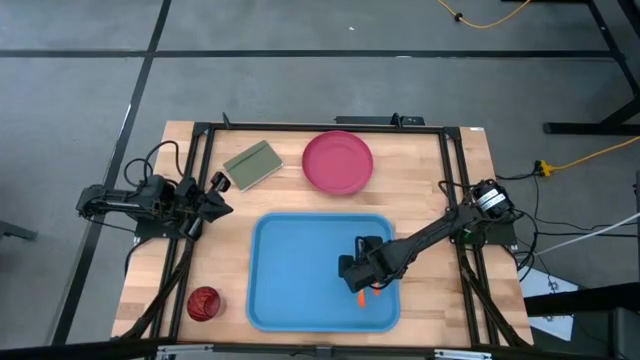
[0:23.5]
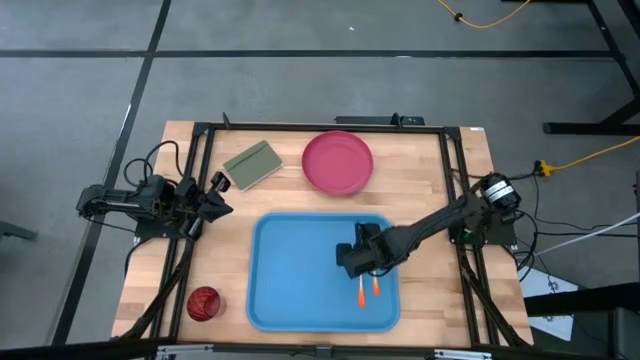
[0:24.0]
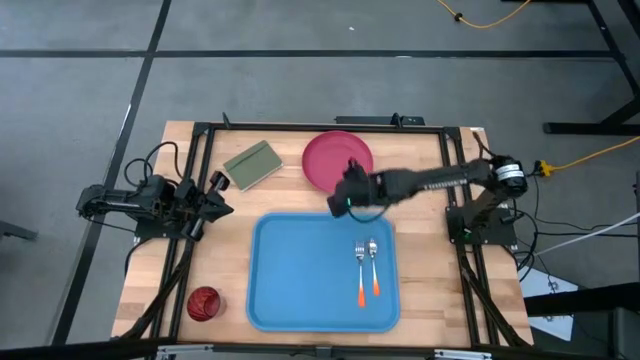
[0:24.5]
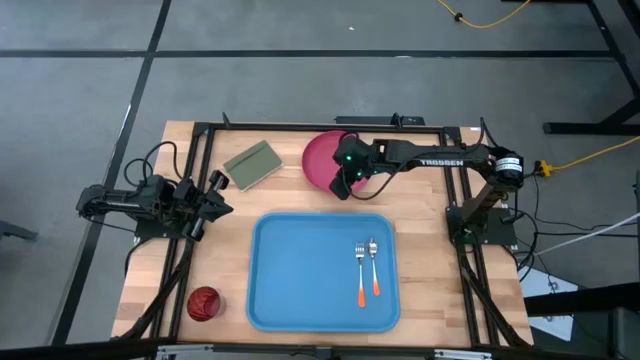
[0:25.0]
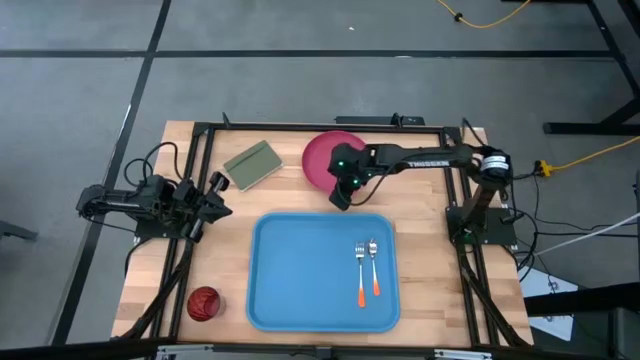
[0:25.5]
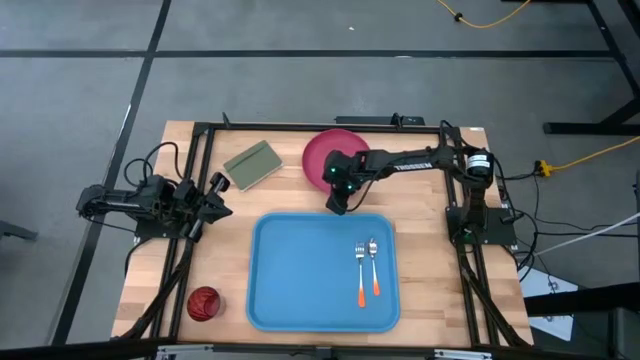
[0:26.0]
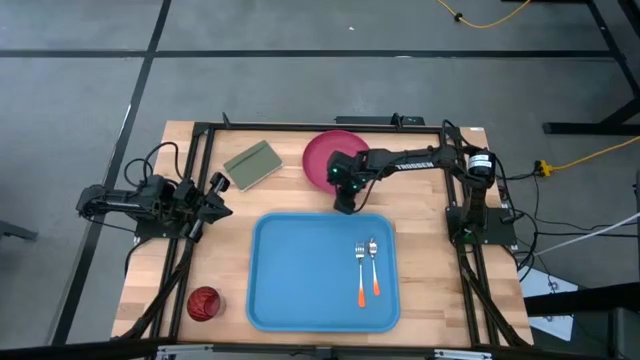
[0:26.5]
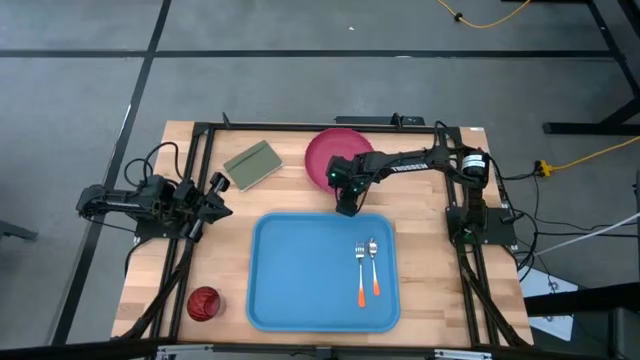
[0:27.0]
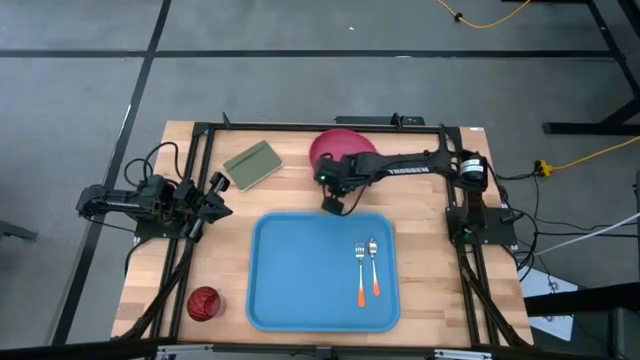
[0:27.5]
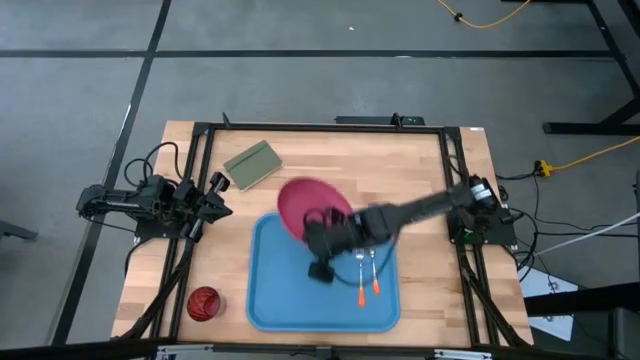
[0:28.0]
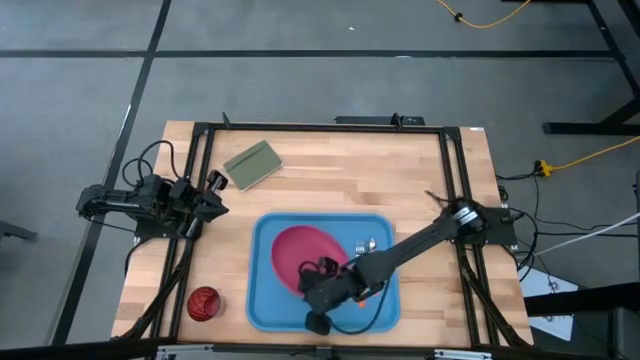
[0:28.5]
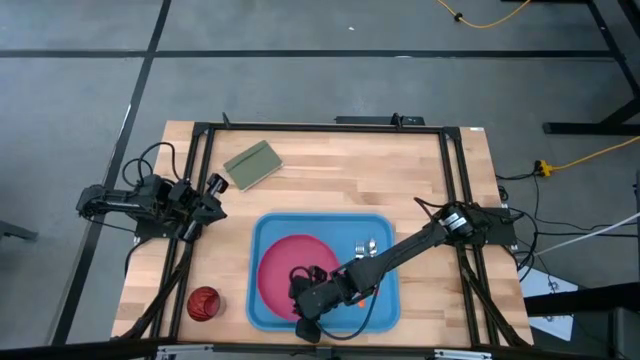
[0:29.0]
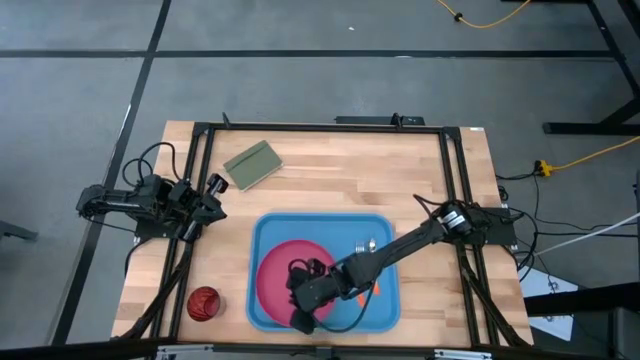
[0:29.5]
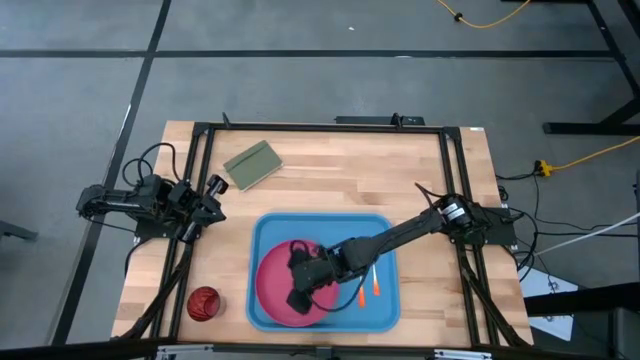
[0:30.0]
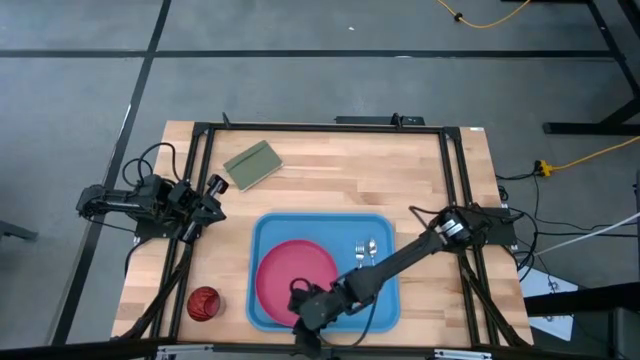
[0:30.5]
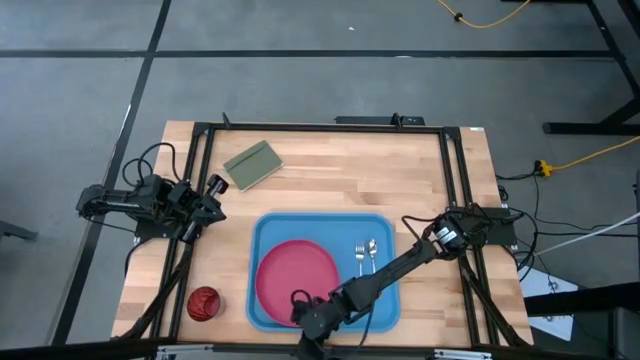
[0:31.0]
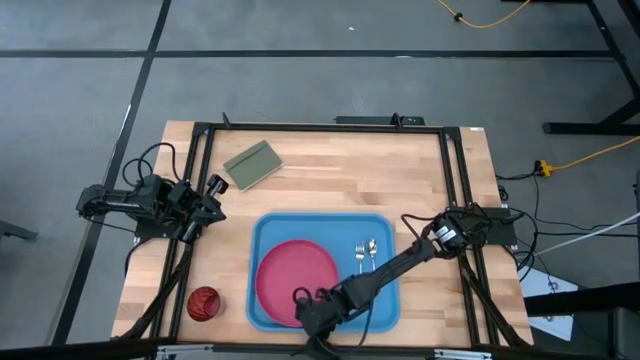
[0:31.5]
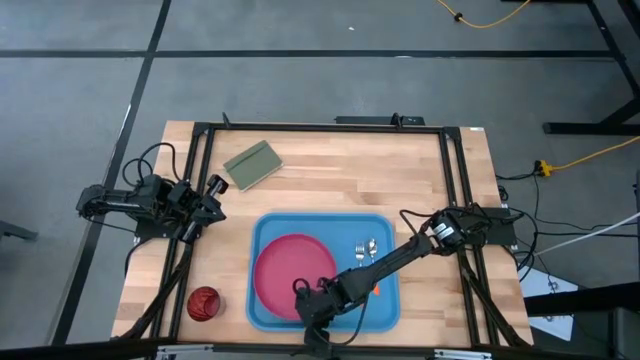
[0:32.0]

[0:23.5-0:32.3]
Task: Pick and place plate/cup/fork/spoon on tray
Put the pink plate on the blue tray

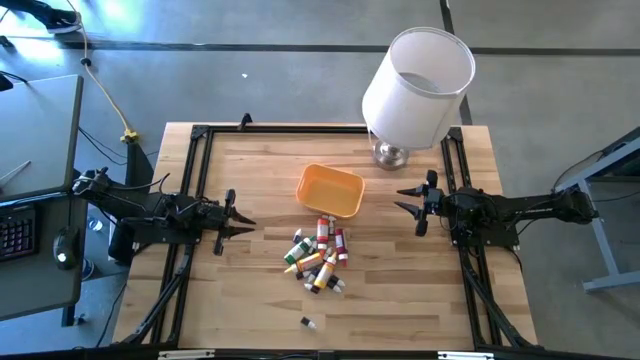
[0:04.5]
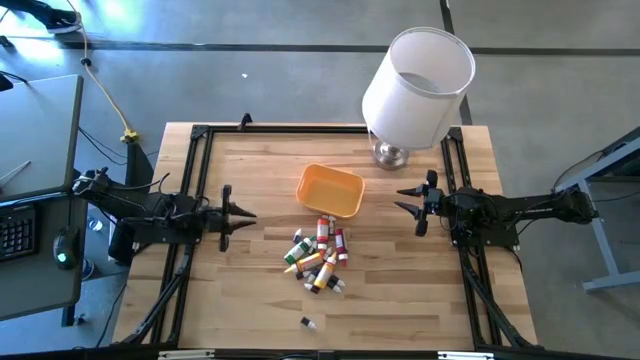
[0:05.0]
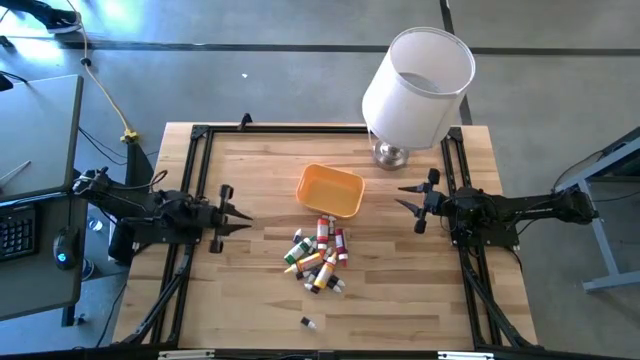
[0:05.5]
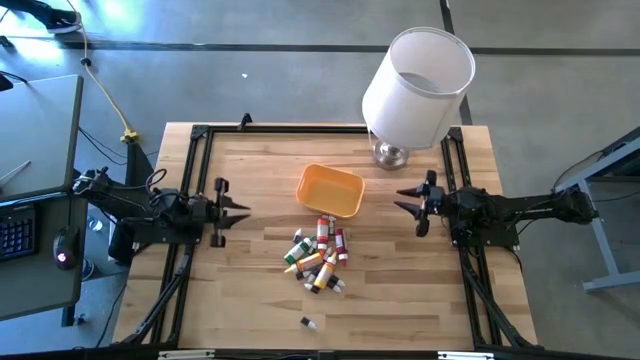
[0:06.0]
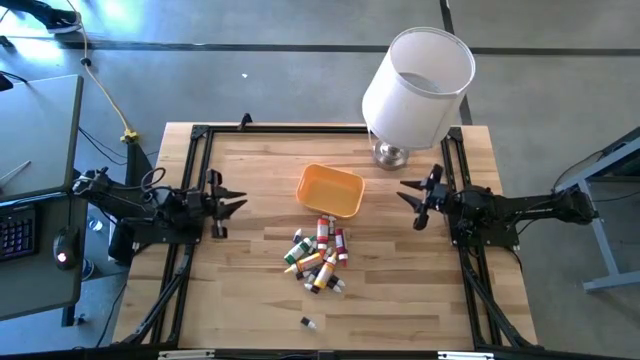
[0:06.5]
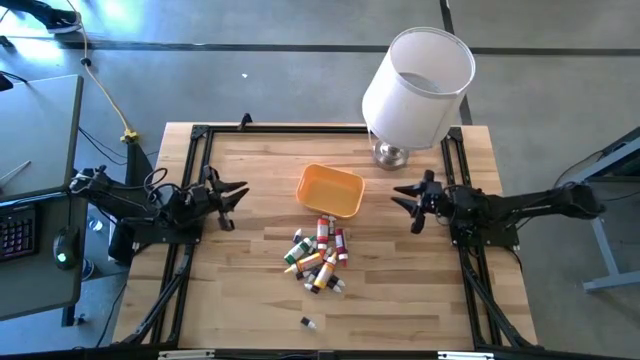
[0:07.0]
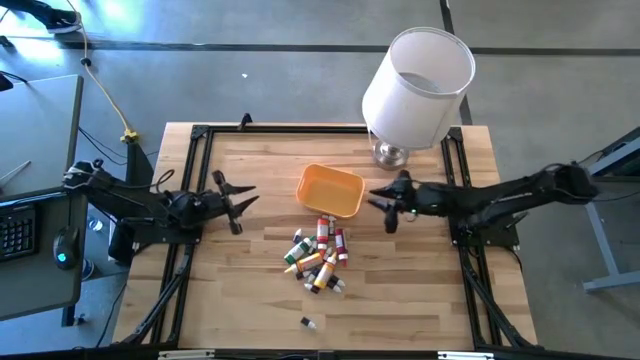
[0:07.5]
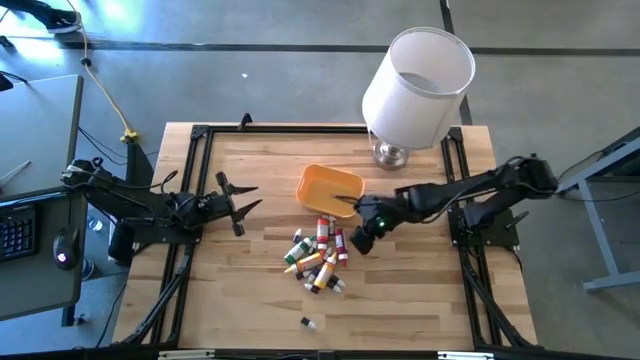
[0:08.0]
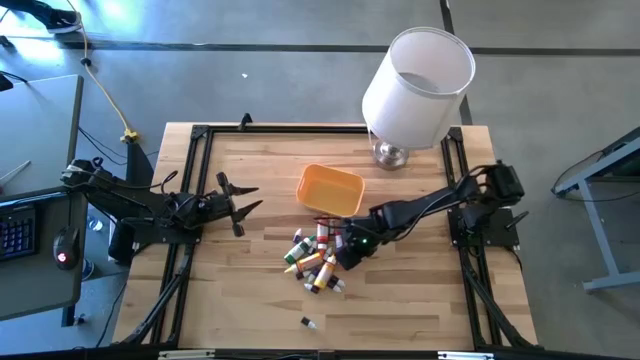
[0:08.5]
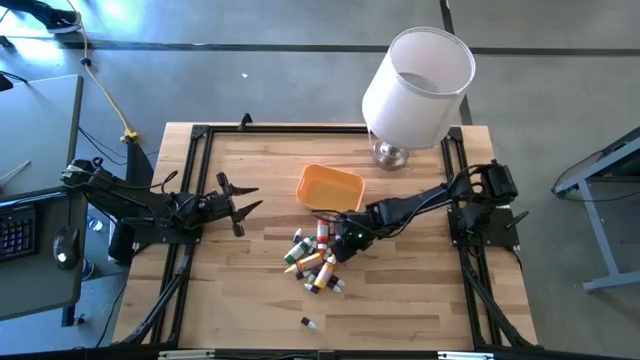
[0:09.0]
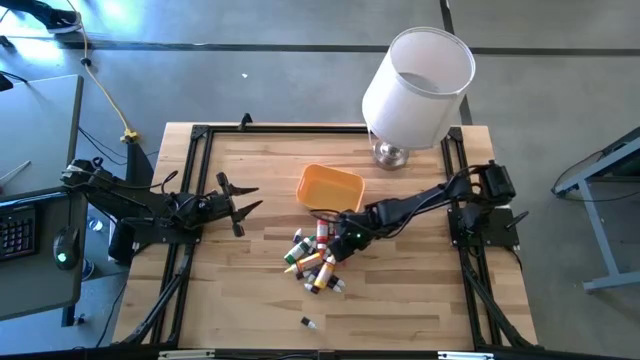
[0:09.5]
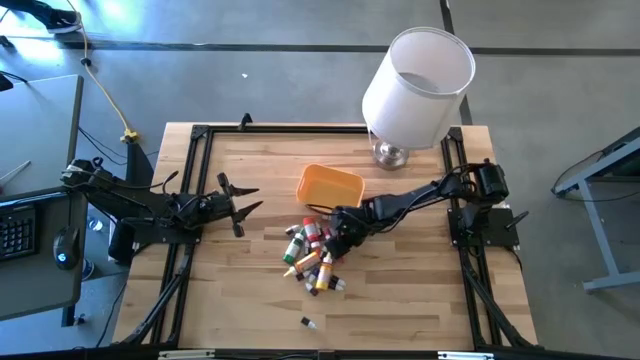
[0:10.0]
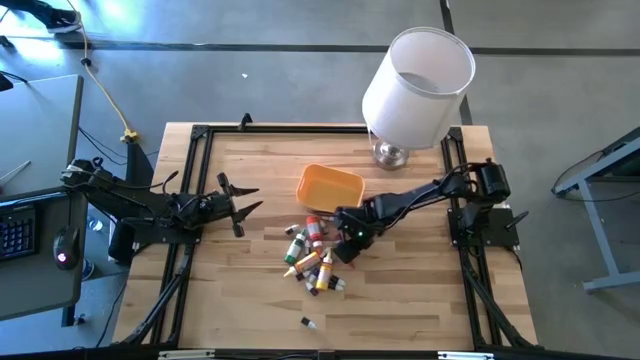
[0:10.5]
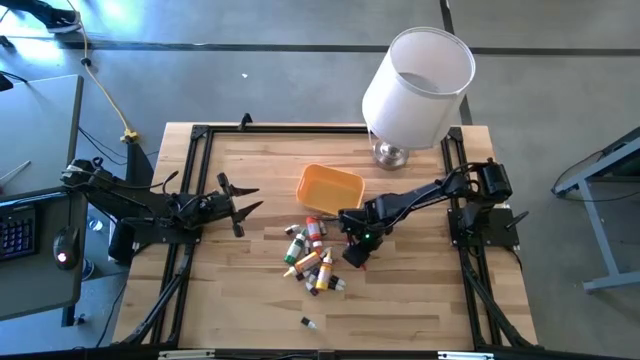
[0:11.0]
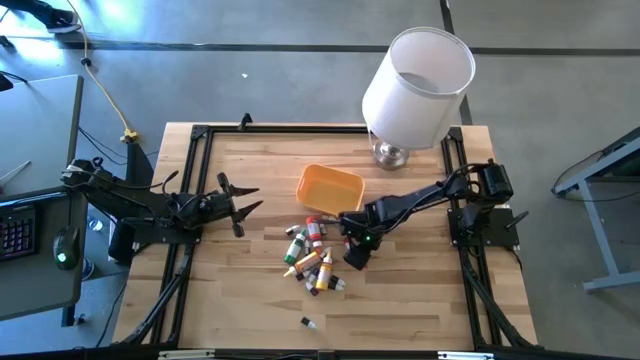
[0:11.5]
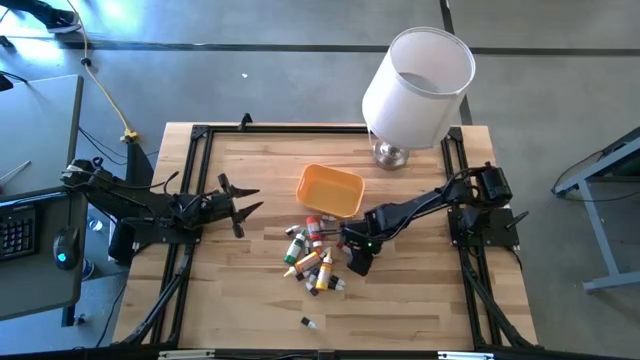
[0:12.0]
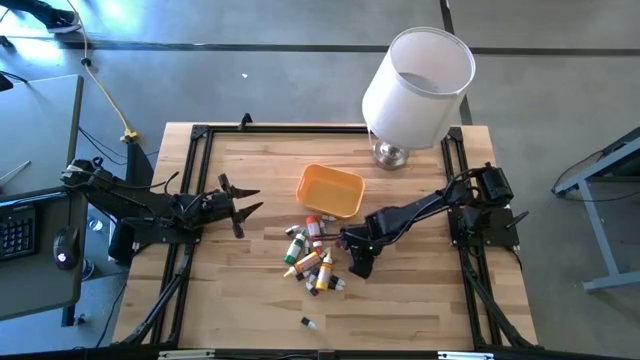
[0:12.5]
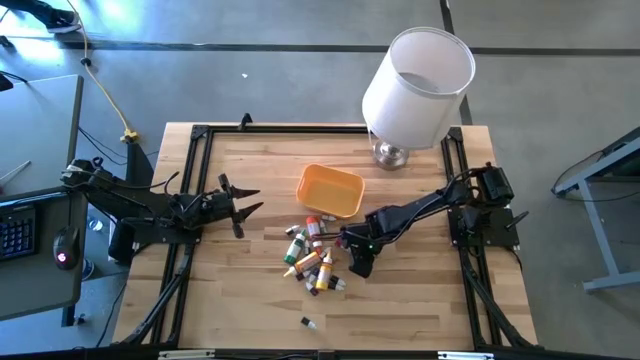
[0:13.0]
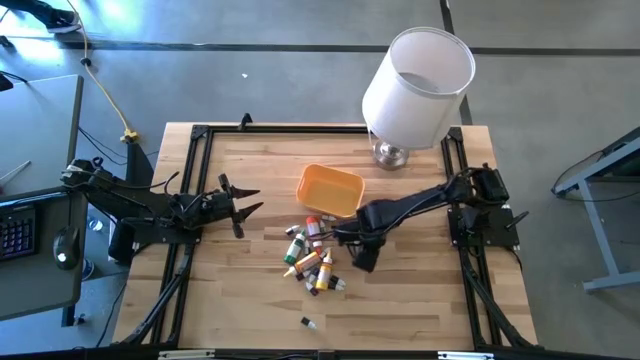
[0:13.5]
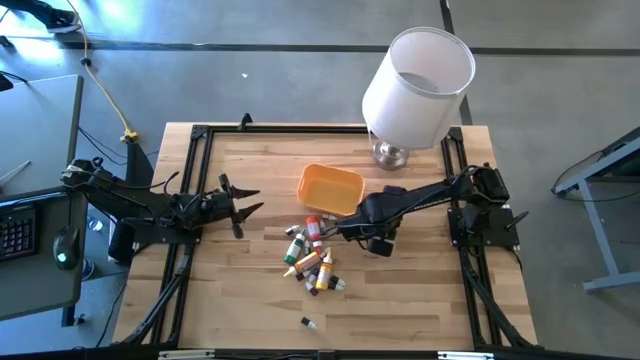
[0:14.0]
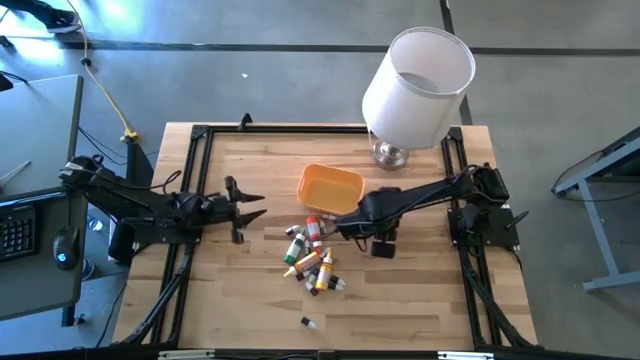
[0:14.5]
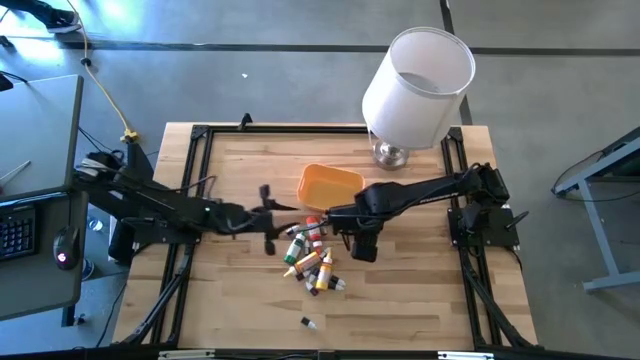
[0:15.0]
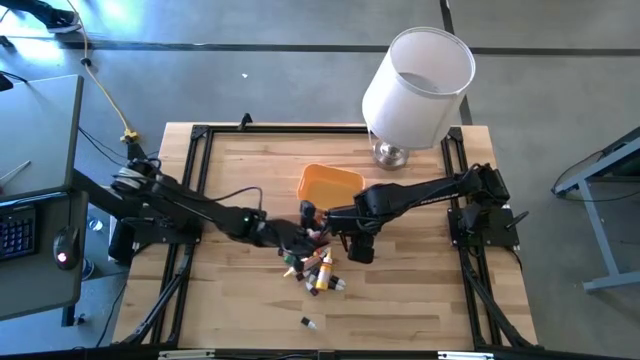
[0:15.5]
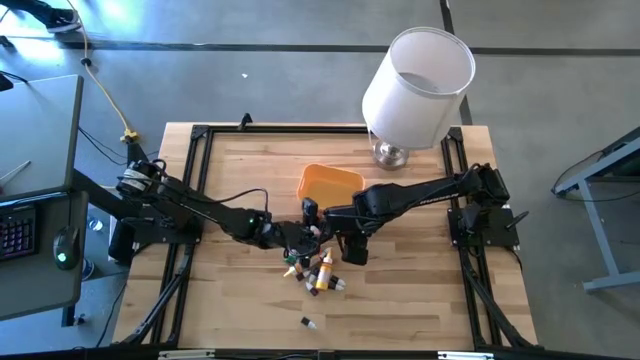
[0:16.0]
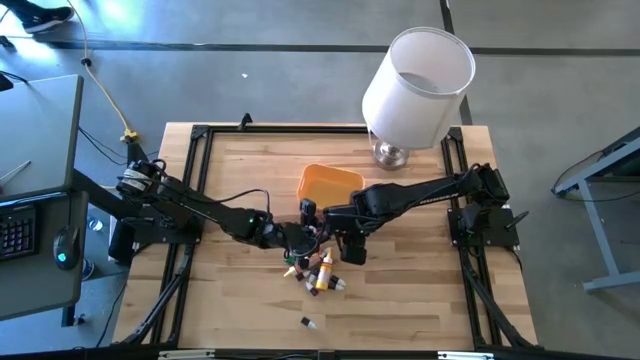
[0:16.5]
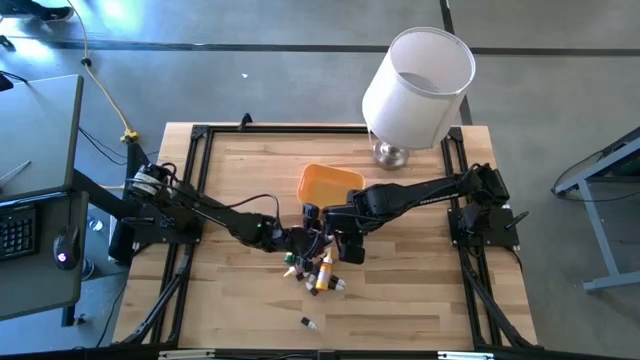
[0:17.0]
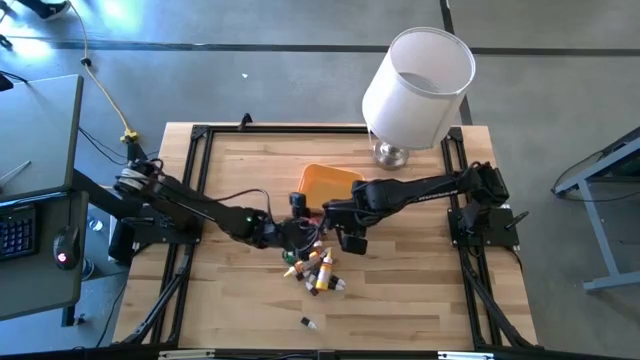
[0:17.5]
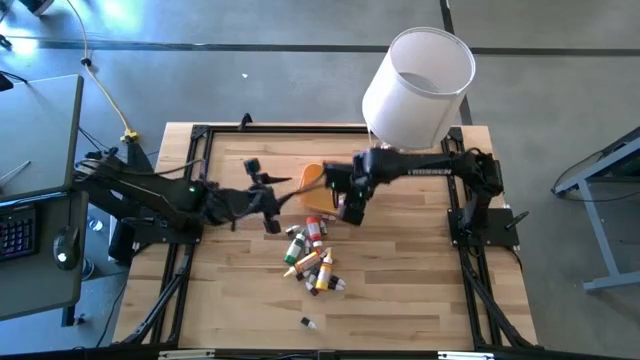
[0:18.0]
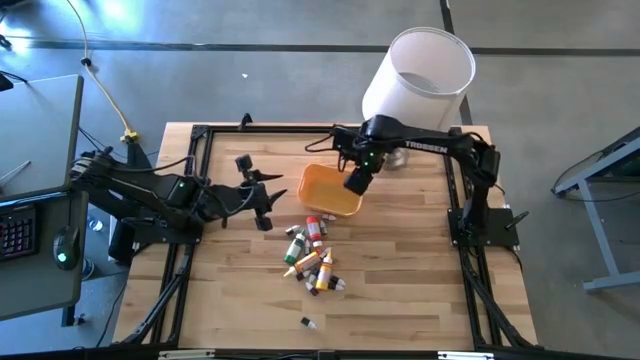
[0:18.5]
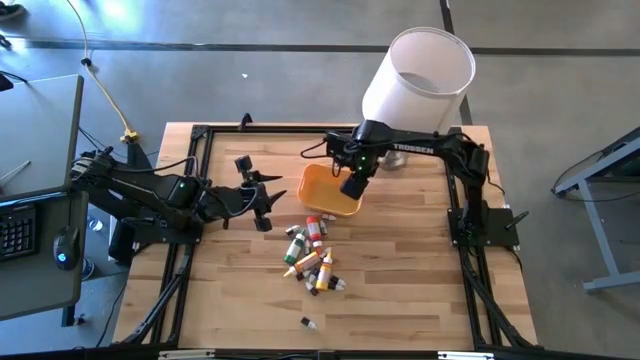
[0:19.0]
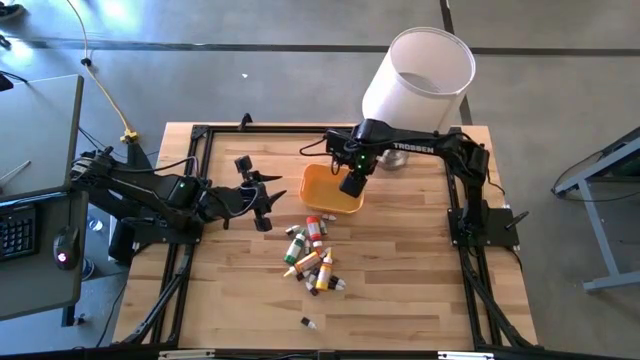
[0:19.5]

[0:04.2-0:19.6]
Task: Pick & Place food coloring
Put the large red food coloring bottle into the yellow container
